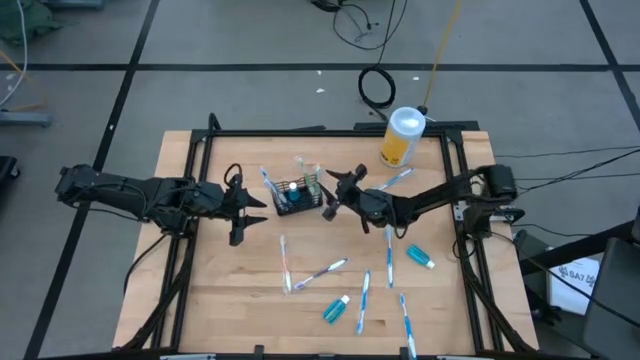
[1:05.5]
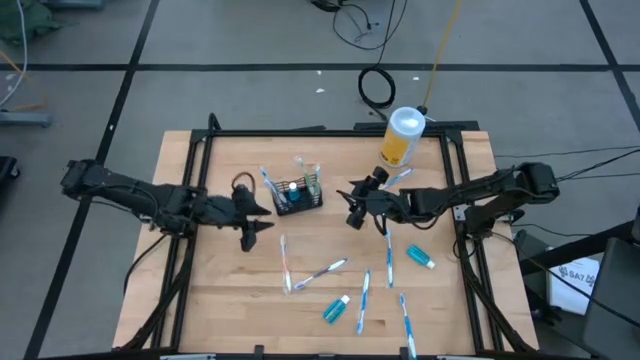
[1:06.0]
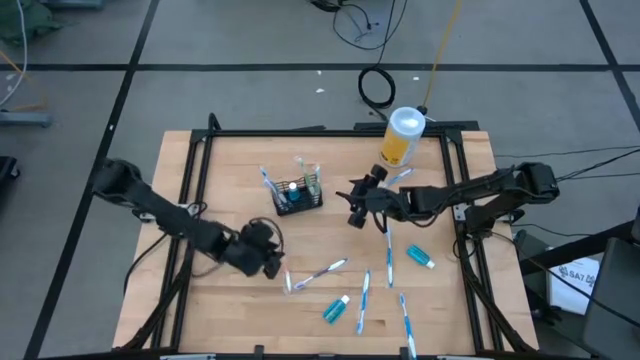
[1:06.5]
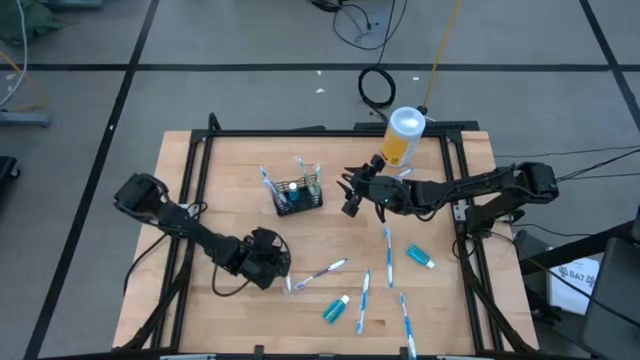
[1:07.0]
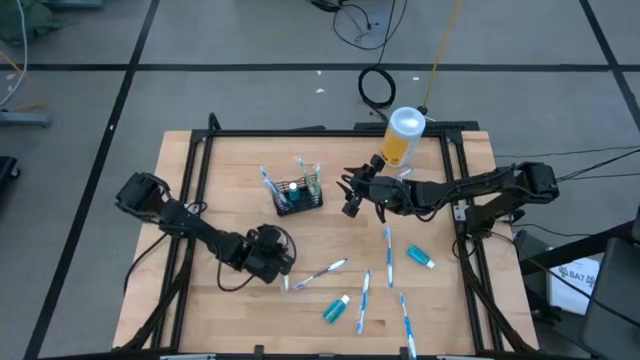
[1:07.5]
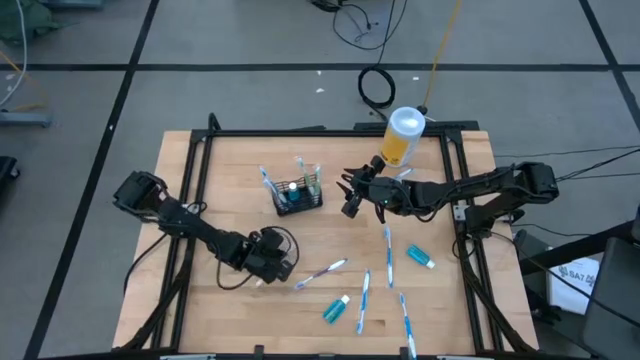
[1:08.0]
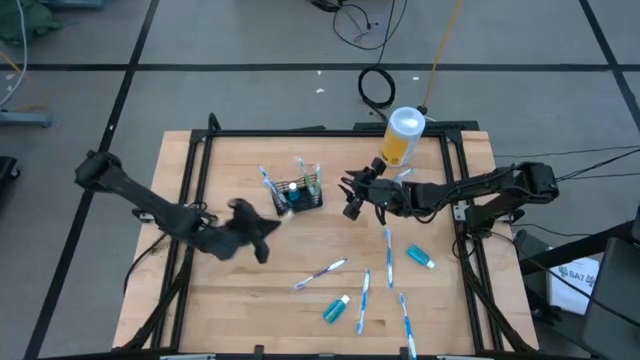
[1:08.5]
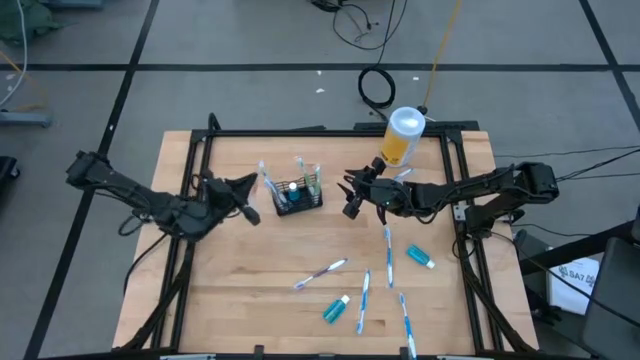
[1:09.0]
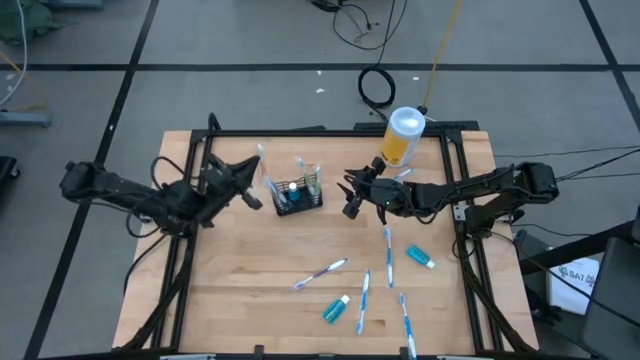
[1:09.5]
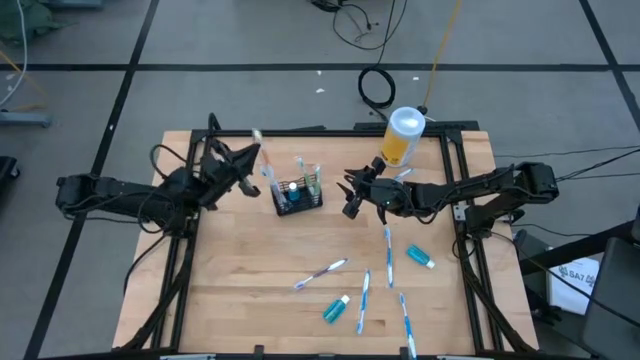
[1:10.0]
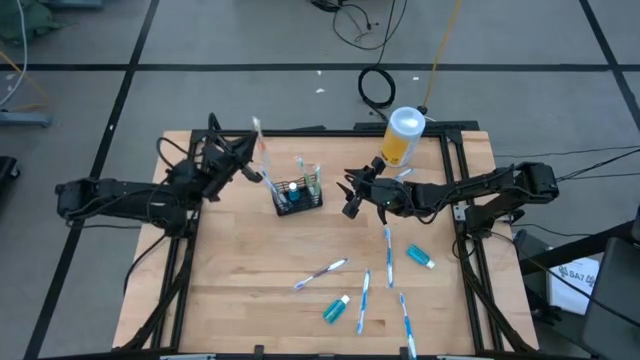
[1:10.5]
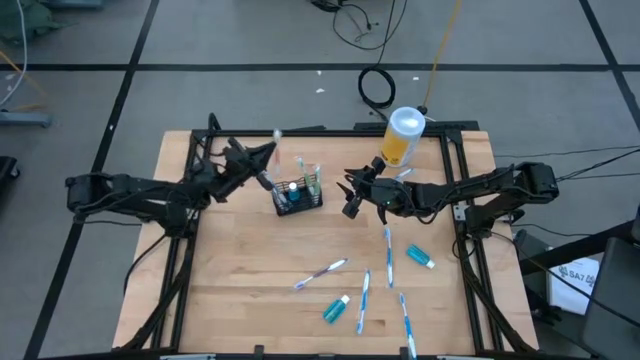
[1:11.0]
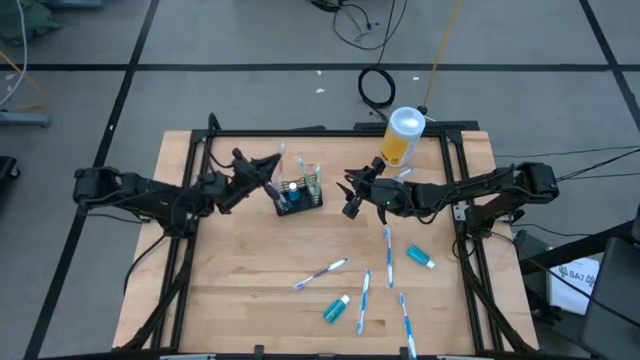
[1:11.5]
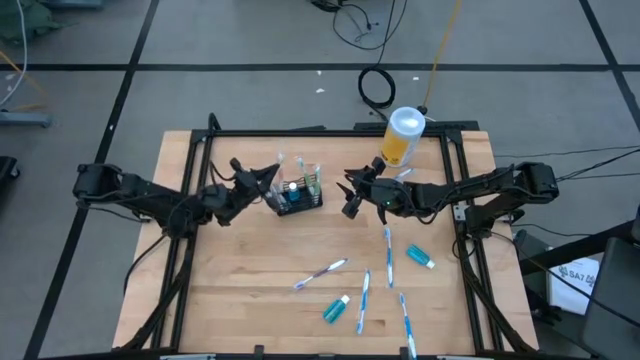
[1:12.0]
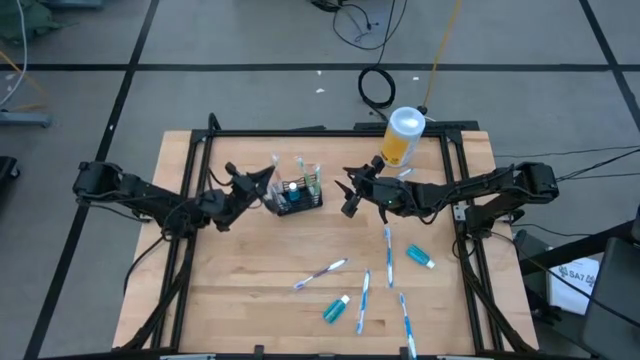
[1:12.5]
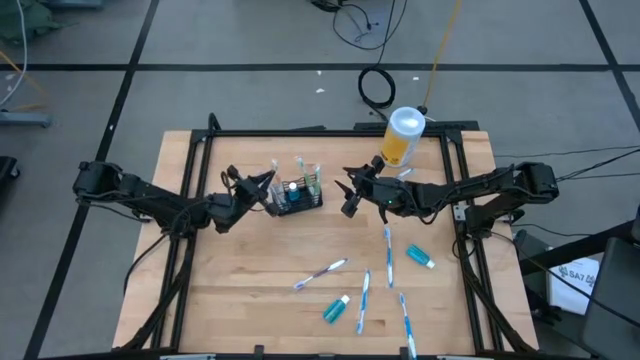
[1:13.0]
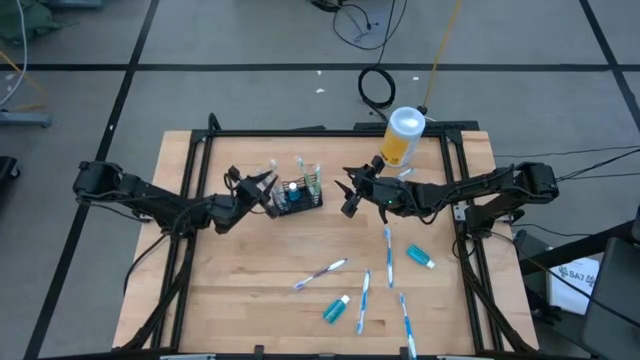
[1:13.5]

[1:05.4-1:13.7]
Task: Pick & Place toothbrushing station
Put the orange toothbrush into the black mesh organizer

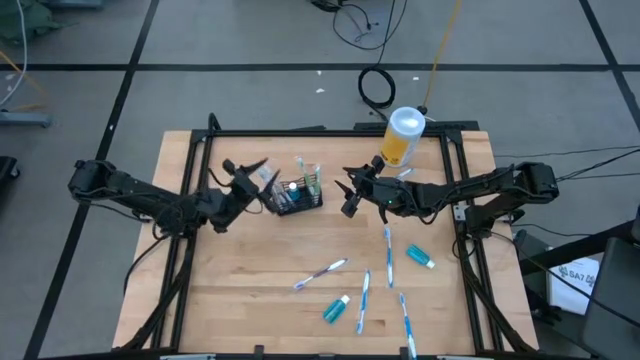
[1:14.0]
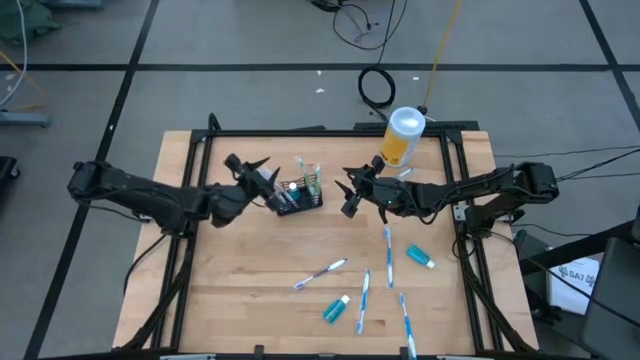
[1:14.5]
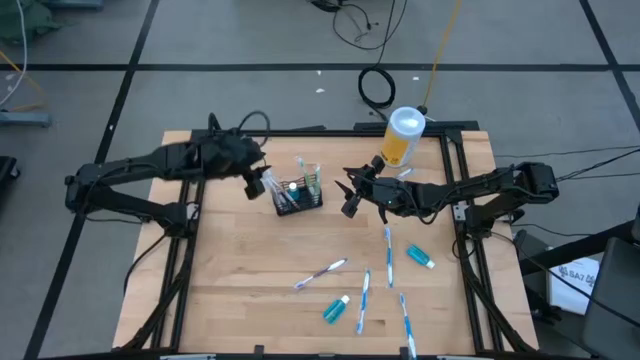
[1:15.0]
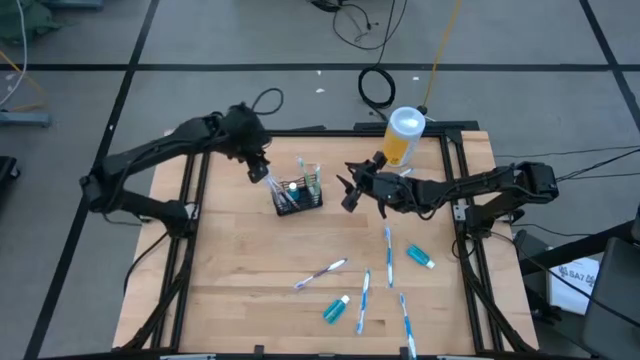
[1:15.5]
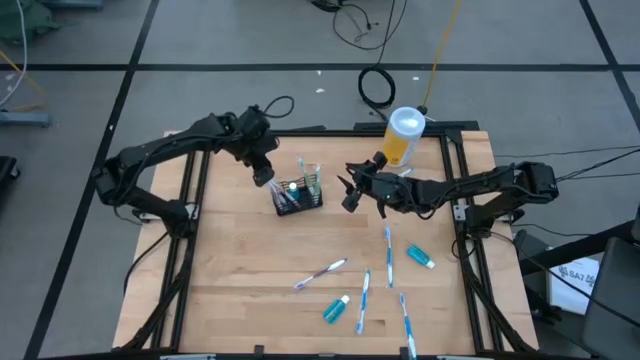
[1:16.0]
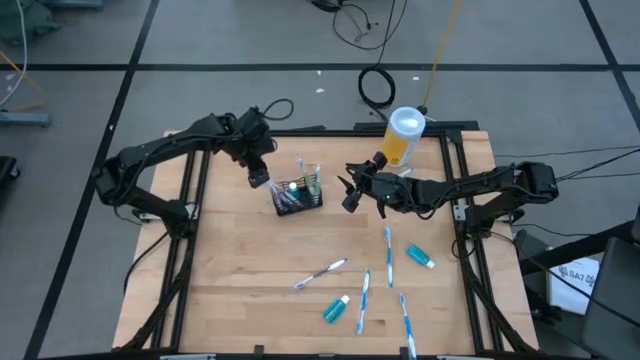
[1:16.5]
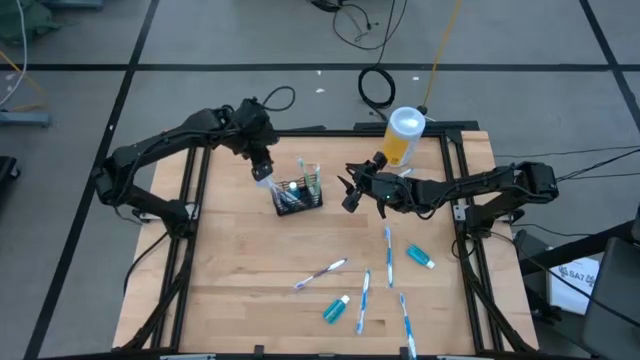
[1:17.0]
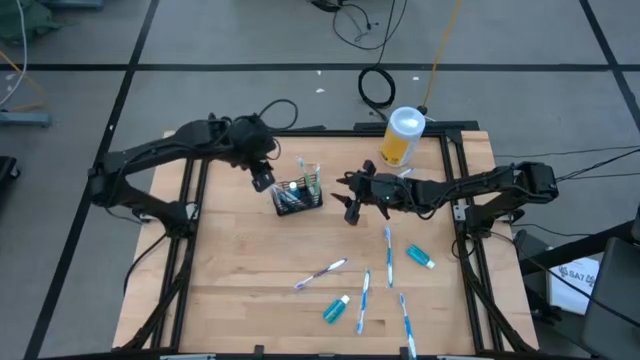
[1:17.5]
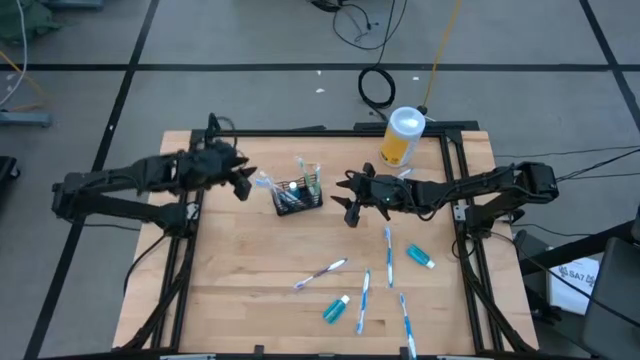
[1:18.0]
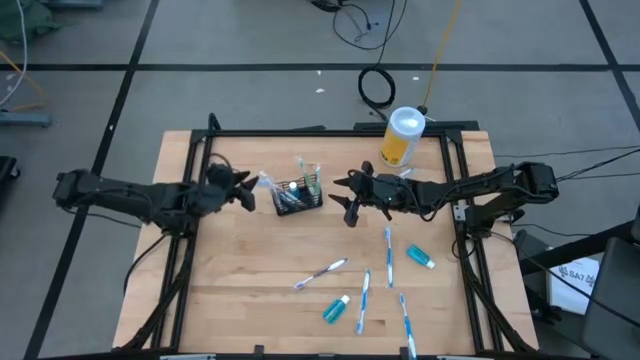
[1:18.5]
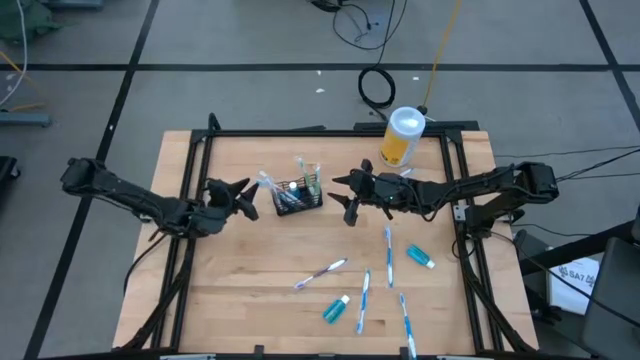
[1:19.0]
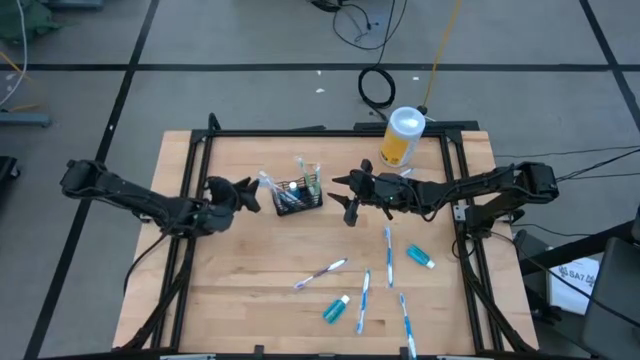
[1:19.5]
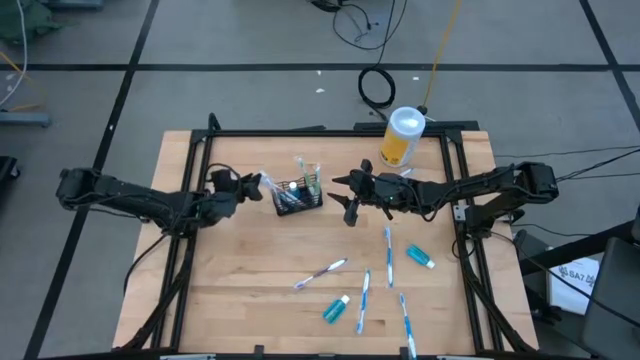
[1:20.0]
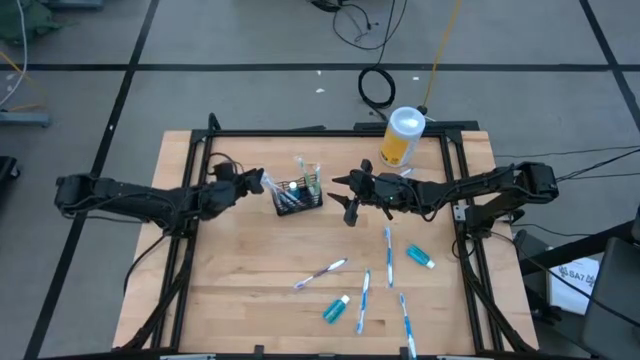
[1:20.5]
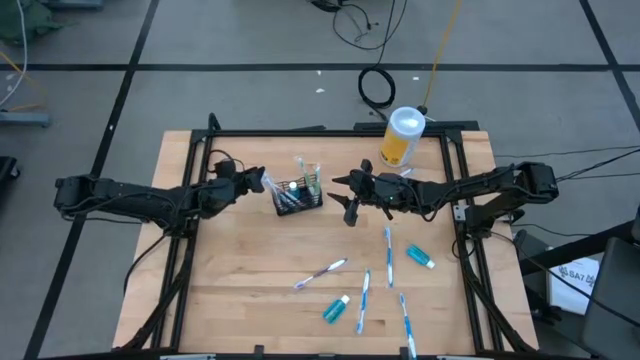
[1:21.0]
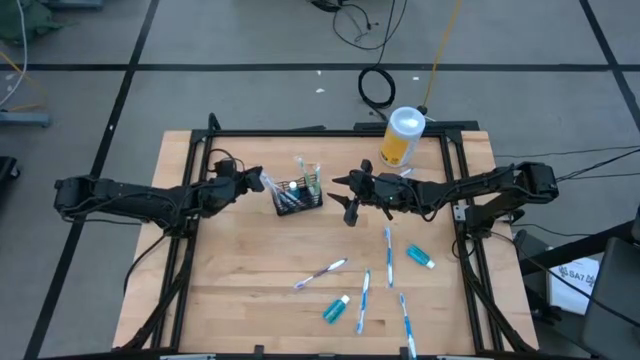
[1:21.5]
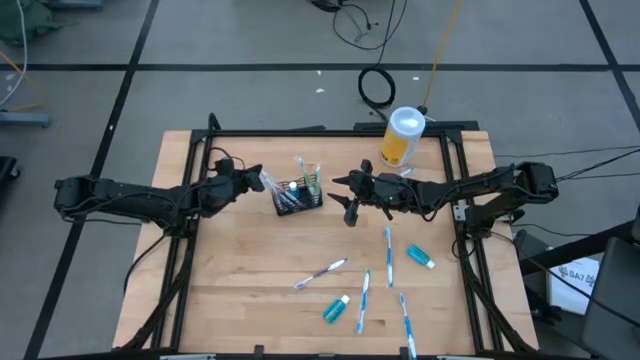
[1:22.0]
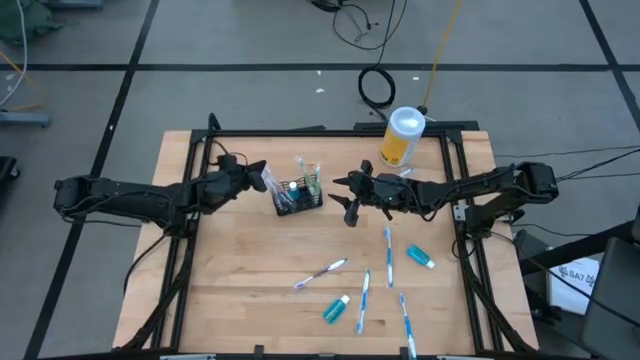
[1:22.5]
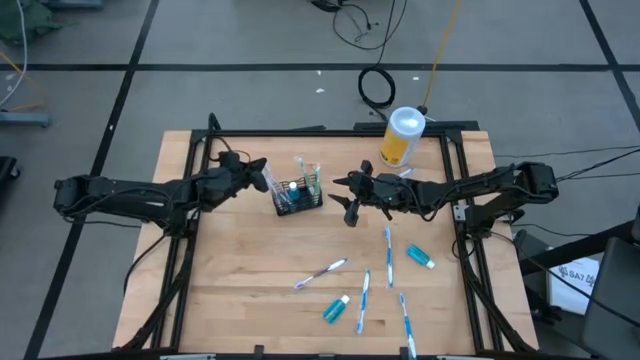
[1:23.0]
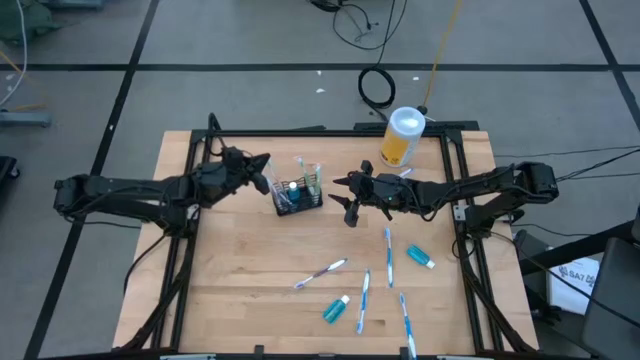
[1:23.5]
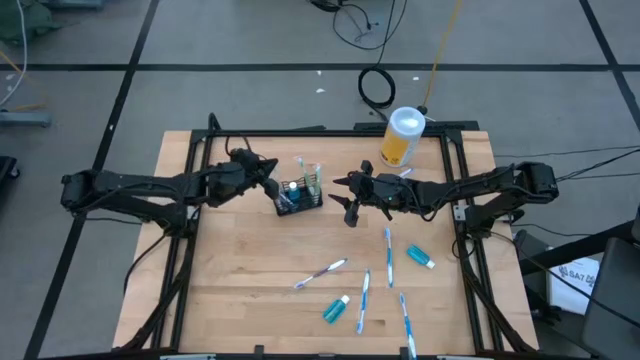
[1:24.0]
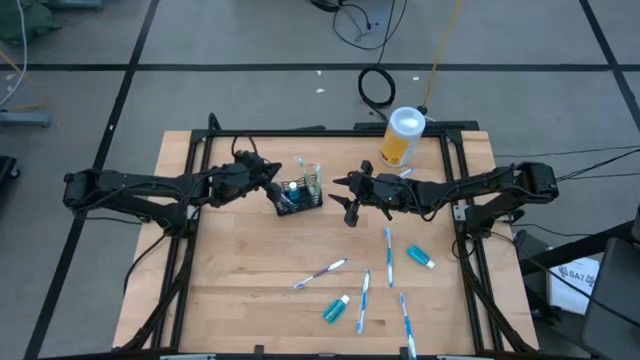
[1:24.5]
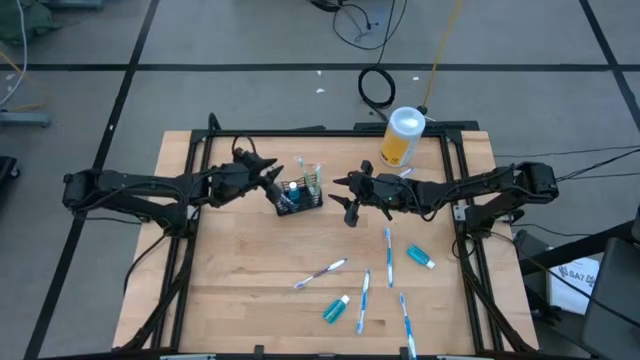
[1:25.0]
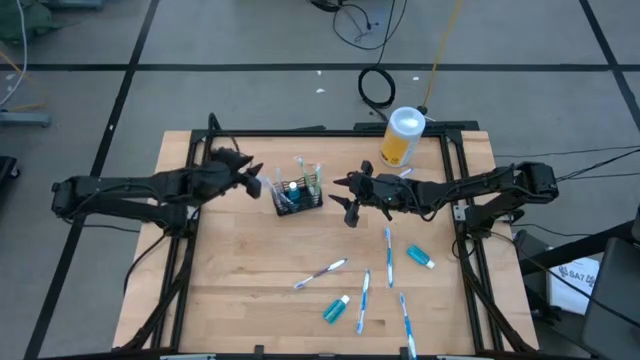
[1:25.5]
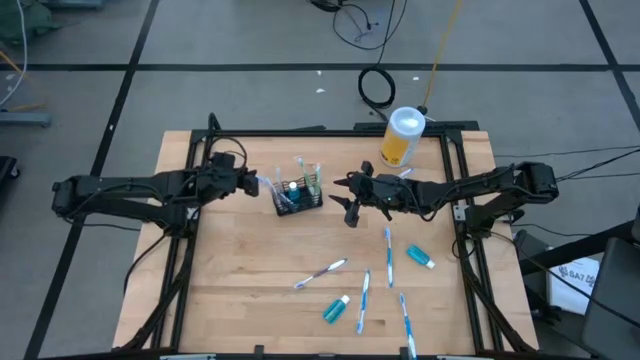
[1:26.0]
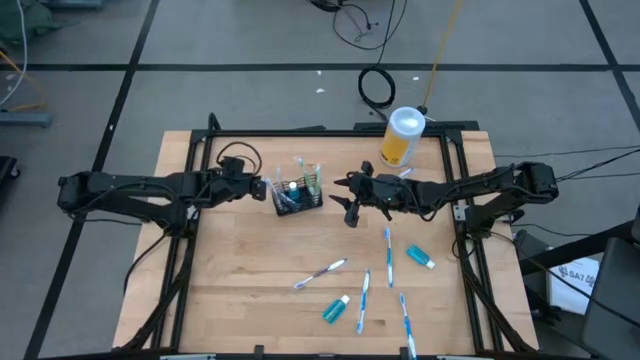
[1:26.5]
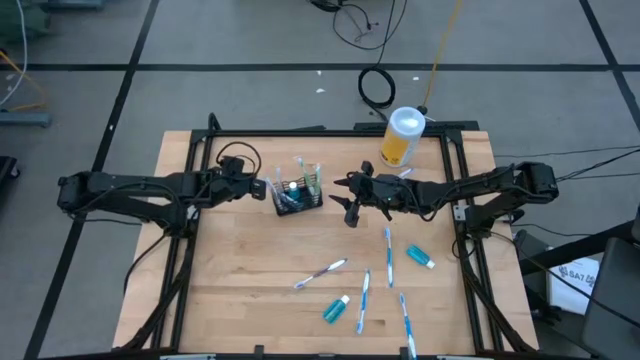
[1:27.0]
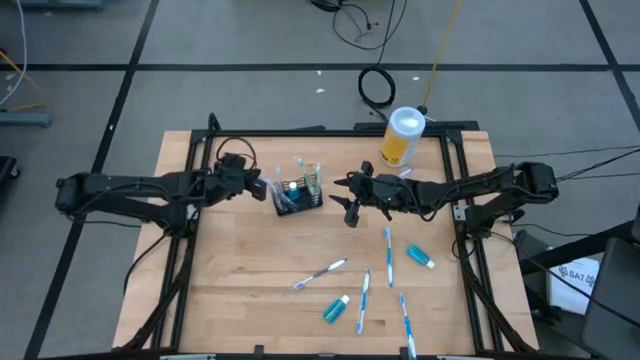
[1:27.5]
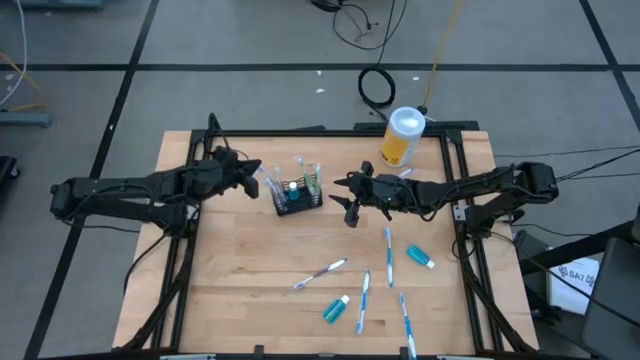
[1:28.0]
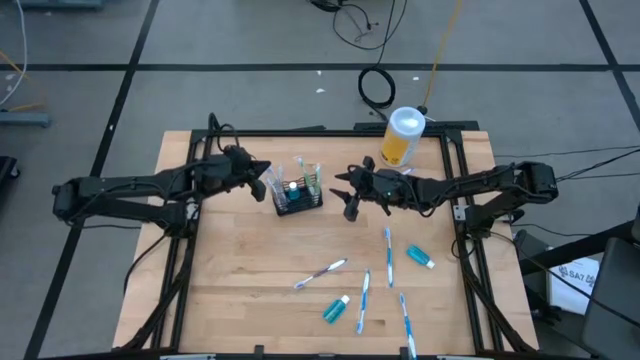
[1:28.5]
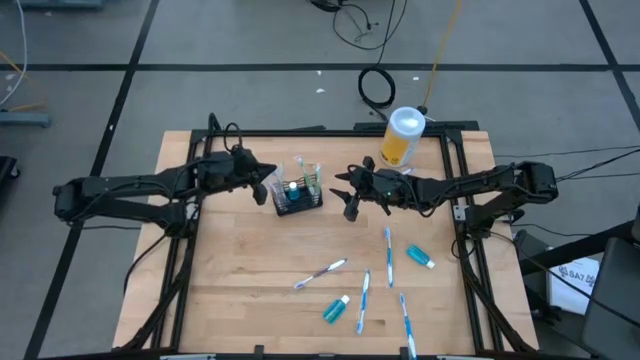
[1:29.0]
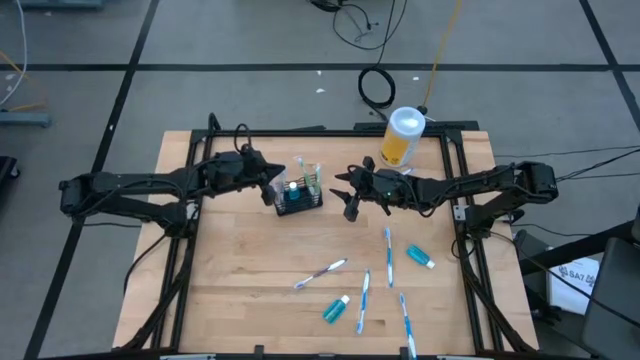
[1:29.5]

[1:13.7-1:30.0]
Adjust the toothbrushes in the black mesh organizer
